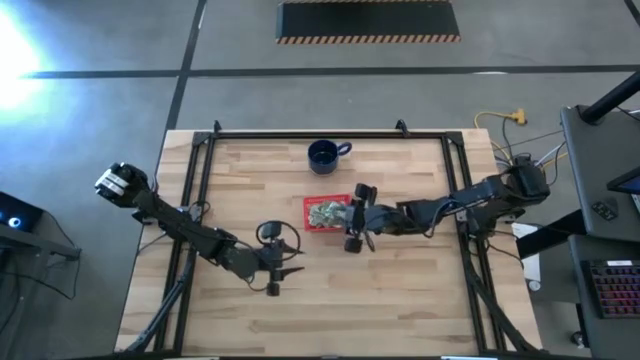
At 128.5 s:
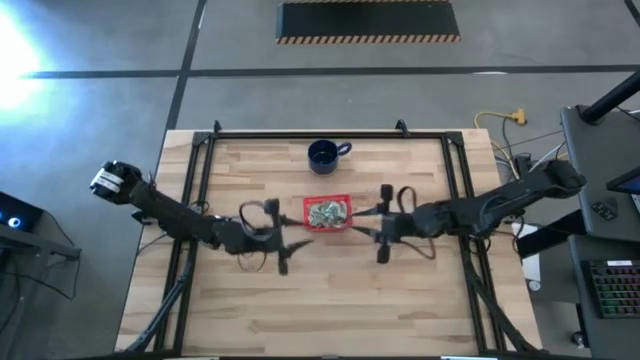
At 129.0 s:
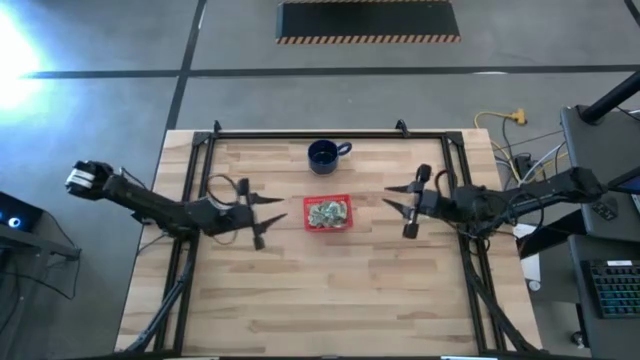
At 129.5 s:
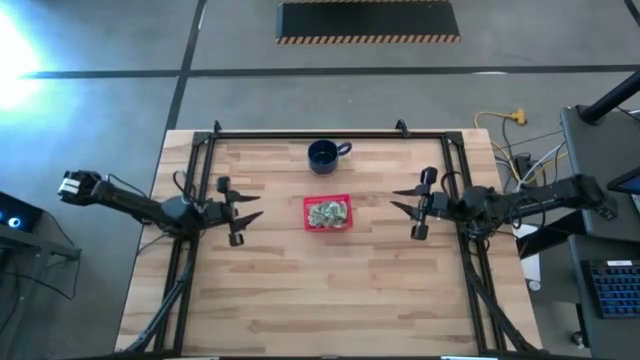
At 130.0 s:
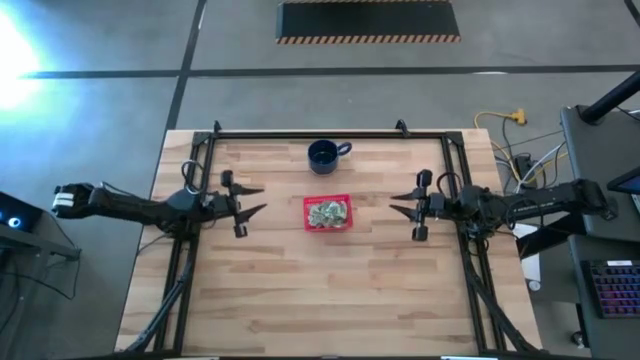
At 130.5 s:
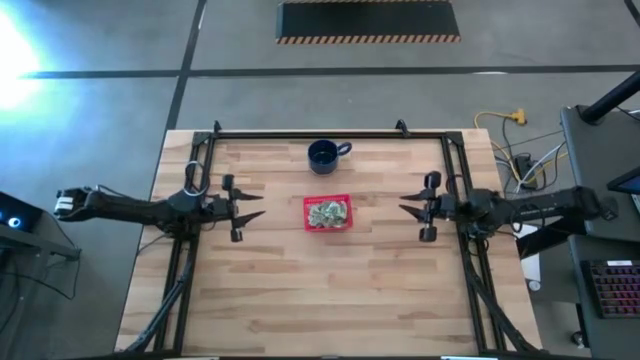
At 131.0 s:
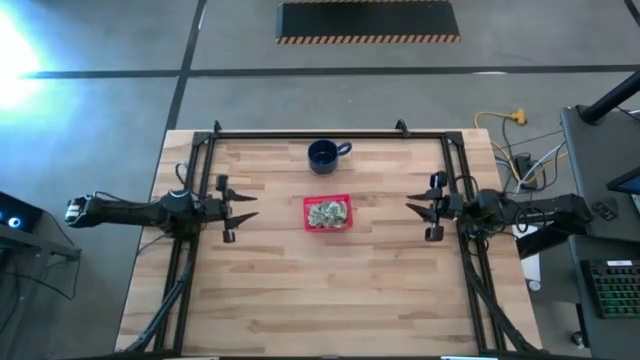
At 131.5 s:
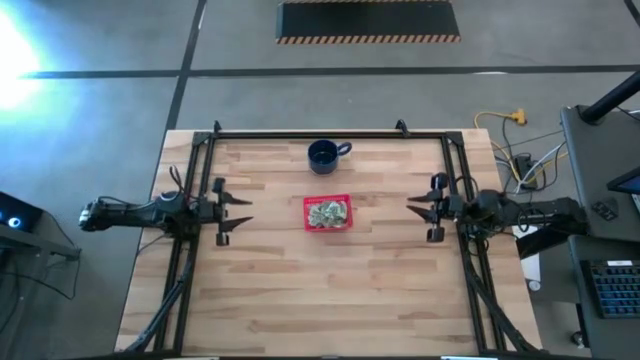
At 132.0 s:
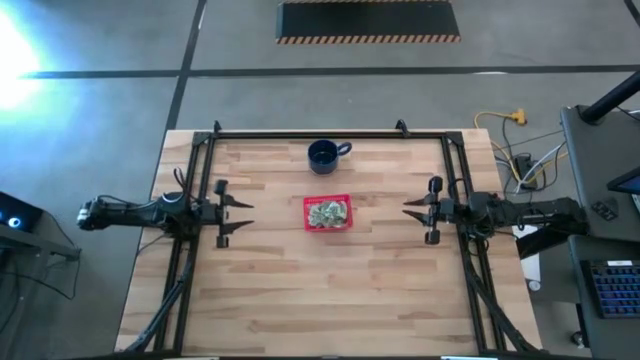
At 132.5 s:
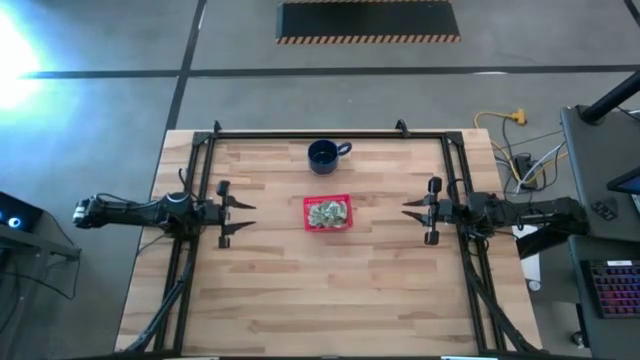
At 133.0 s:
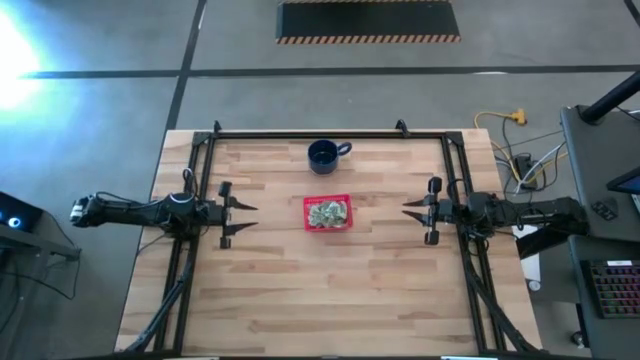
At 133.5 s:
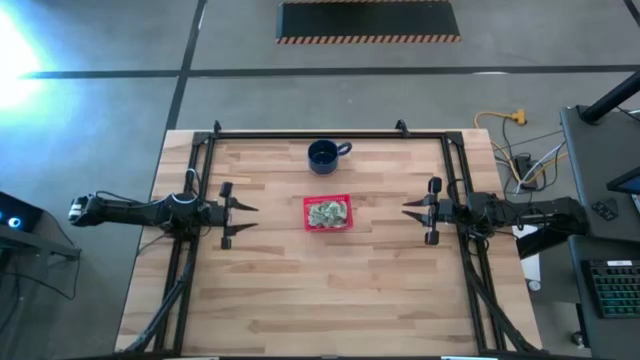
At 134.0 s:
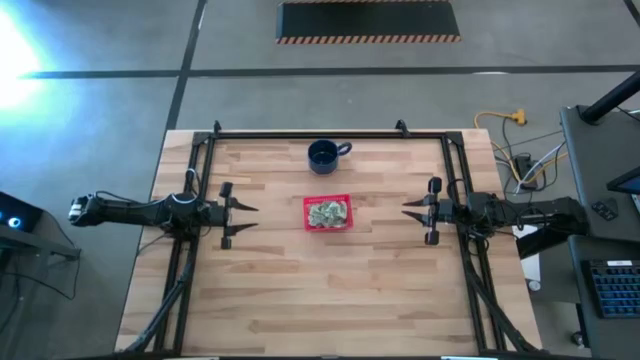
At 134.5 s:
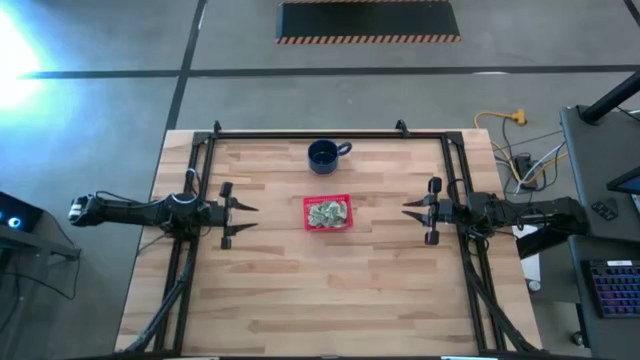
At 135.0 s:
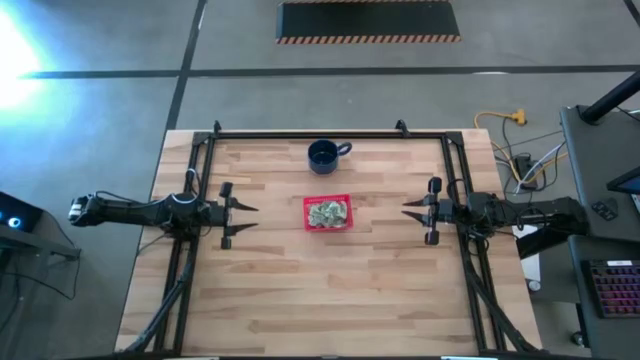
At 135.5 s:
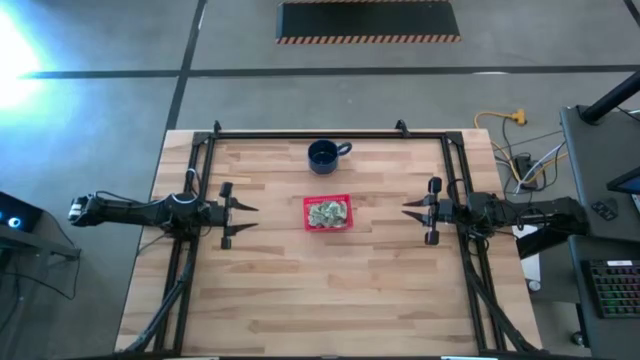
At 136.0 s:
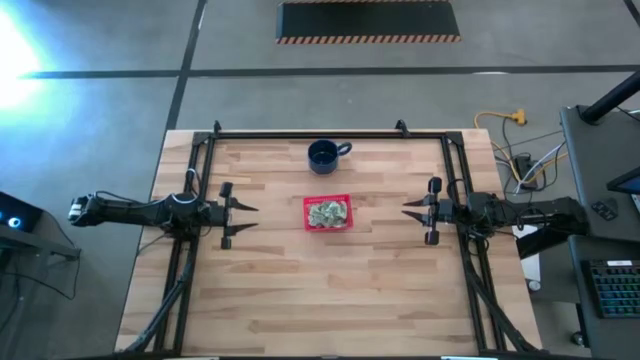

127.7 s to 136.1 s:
Task: Pick and place items into bin
Return to Home Position

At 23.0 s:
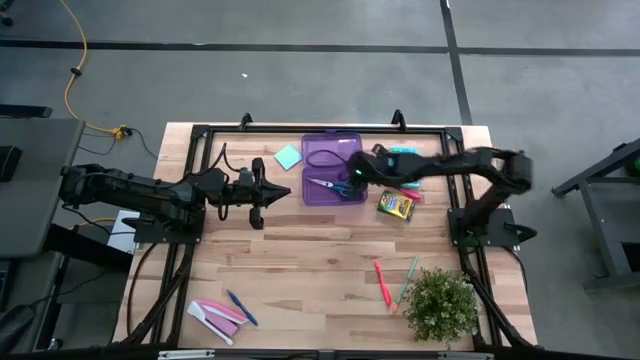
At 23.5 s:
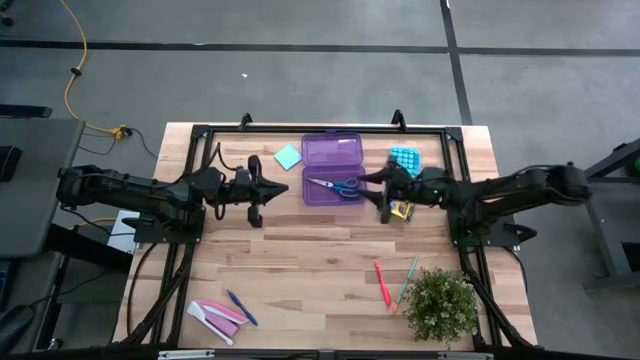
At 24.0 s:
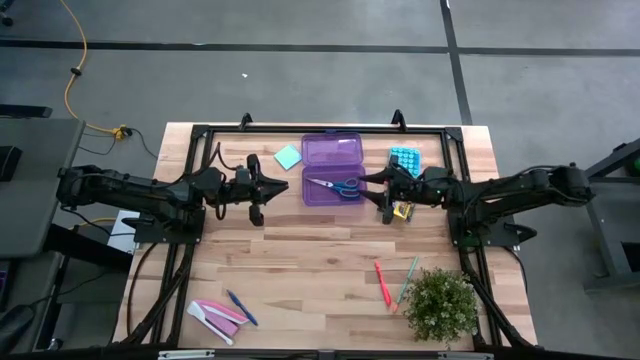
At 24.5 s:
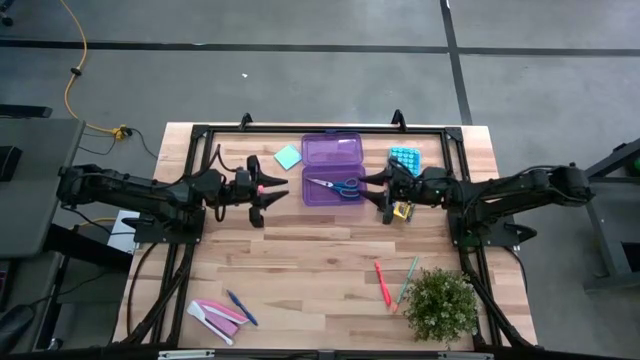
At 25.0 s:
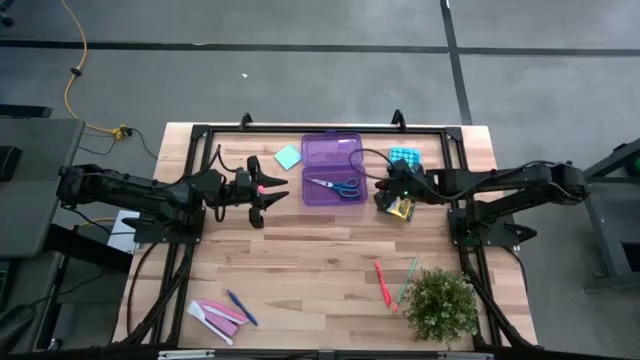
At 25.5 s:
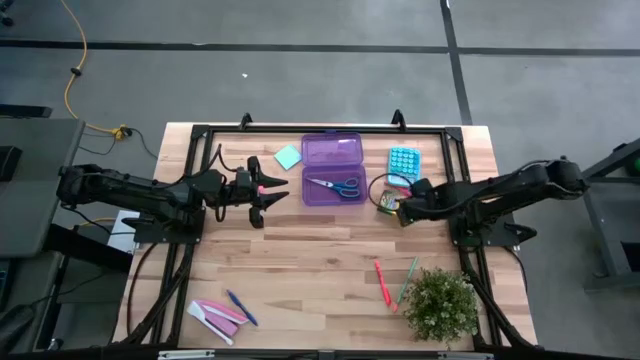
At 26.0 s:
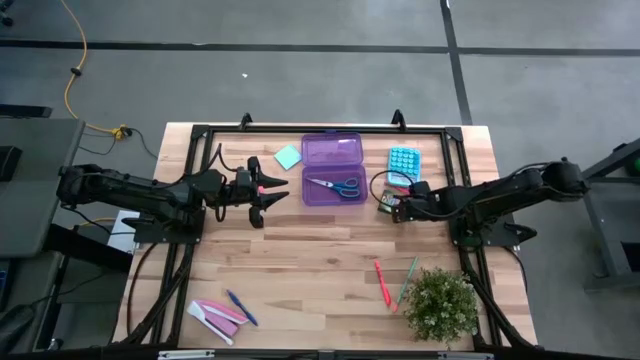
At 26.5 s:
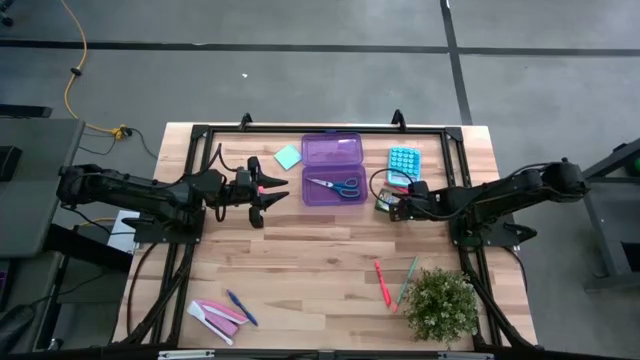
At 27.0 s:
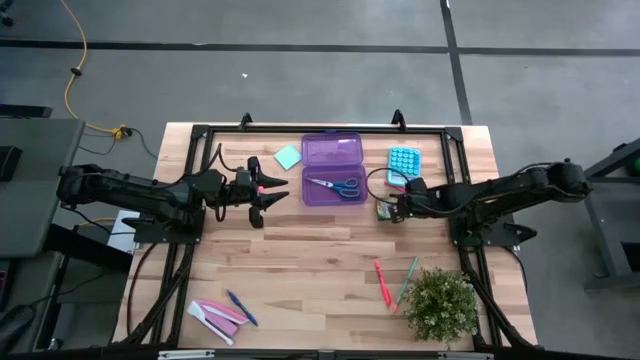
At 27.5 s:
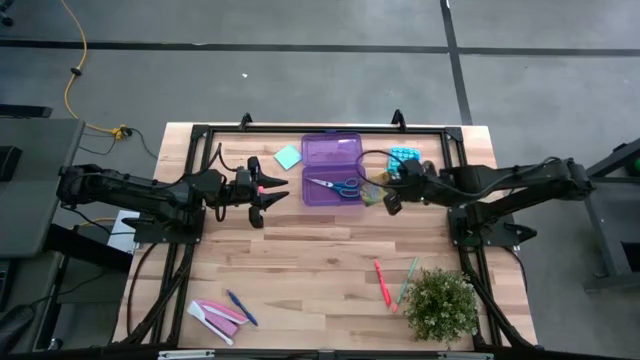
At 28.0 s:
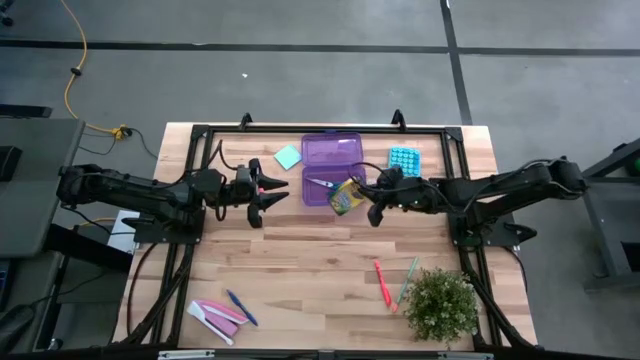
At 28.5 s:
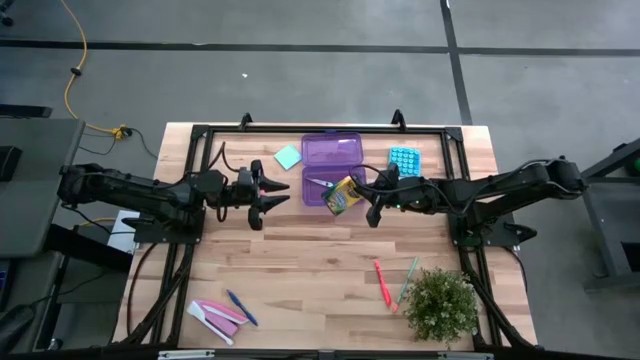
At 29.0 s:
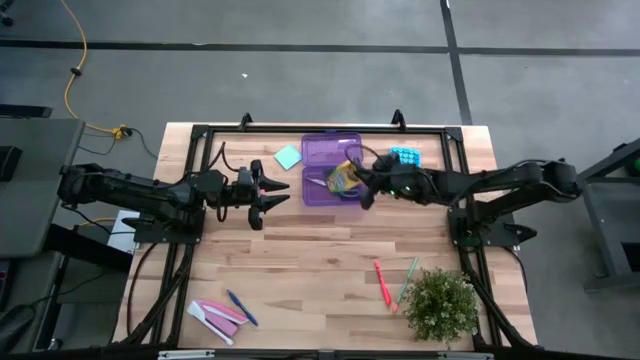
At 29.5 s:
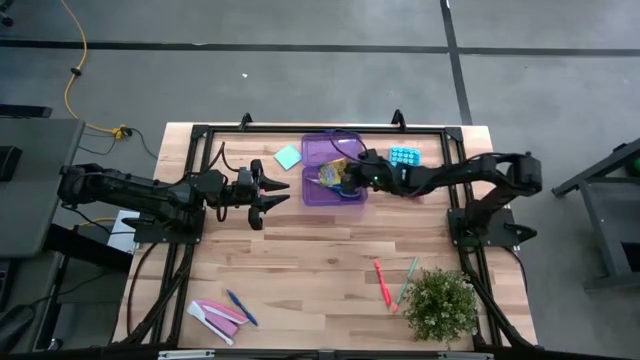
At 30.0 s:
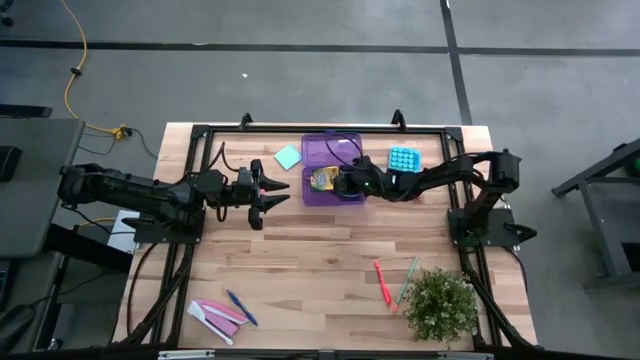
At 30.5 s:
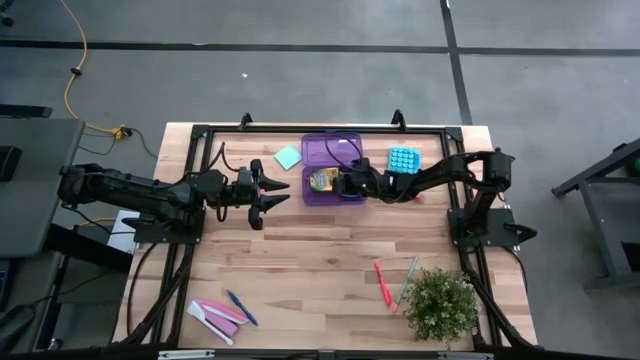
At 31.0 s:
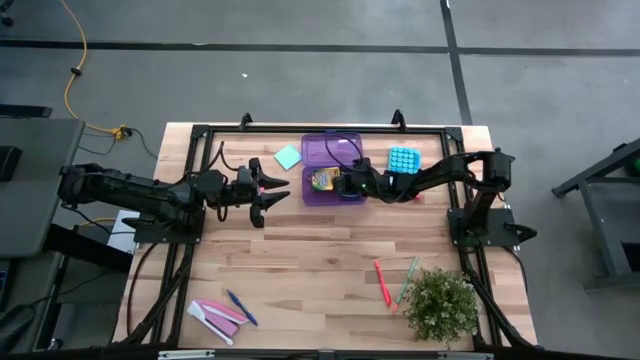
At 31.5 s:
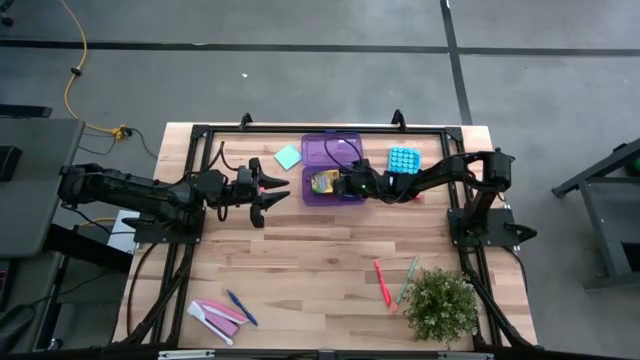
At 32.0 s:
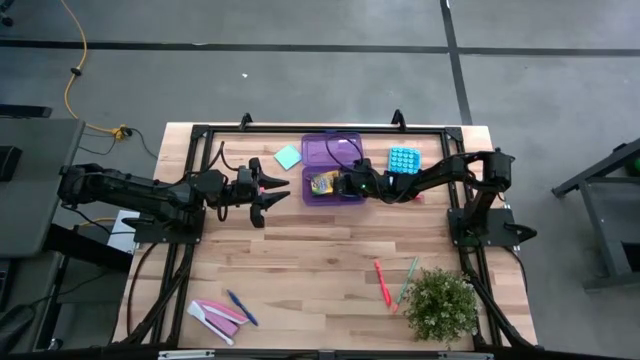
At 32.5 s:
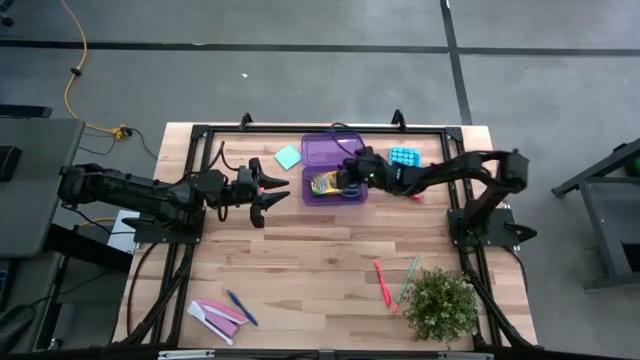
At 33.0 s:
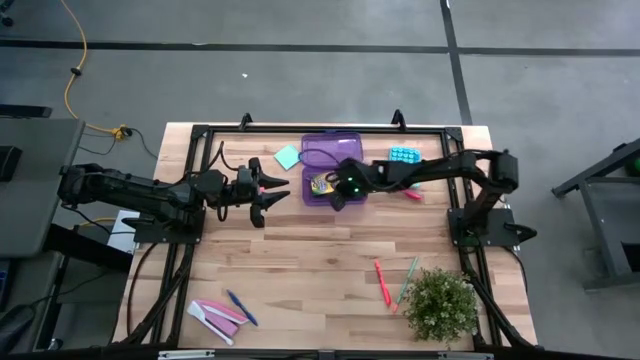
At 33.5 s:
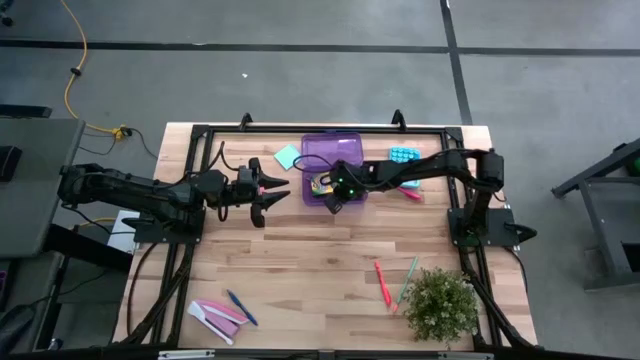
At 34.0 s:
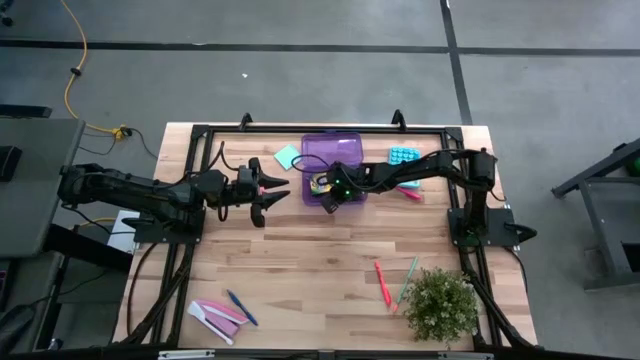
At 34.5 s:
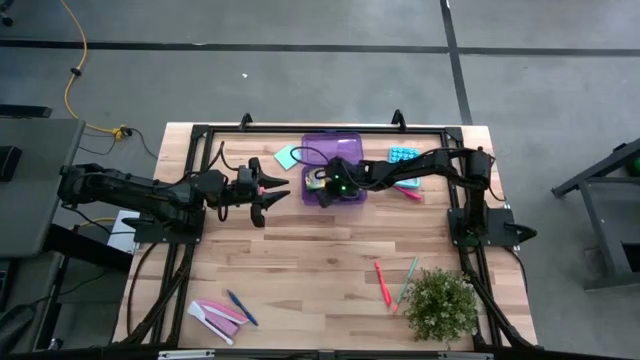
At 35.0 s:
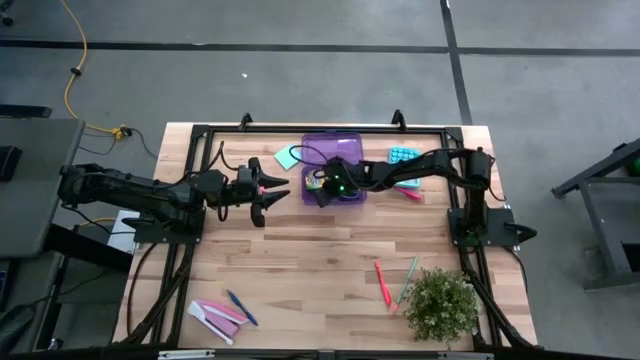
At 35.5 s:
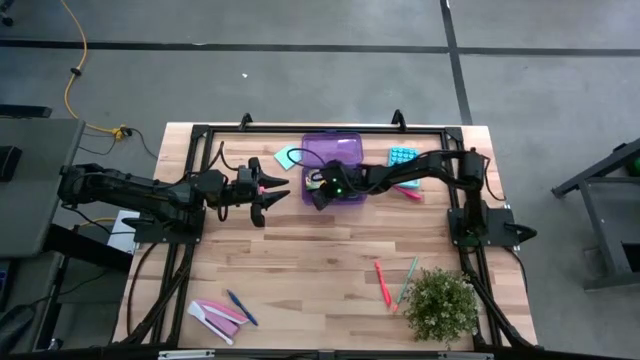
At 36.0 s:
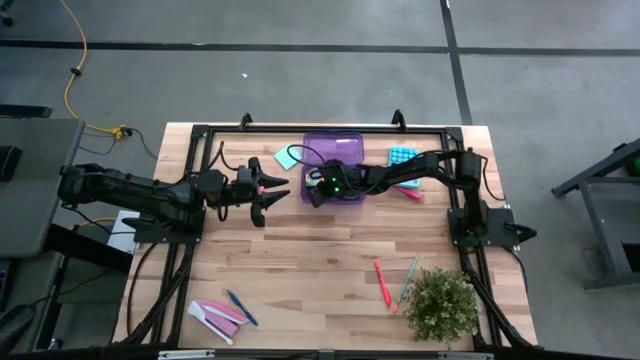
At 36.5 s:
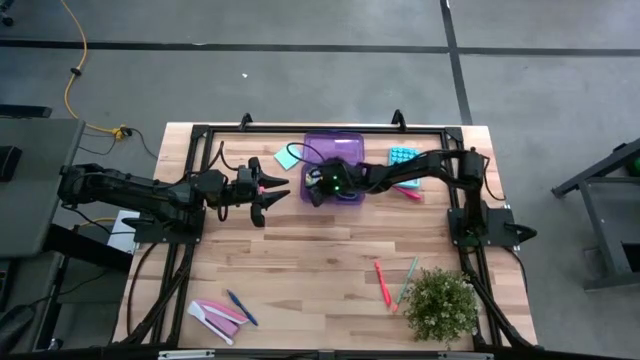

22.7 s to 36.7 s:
Task: Pack school essentials
Put the yellow crayon box into the violet supply box
